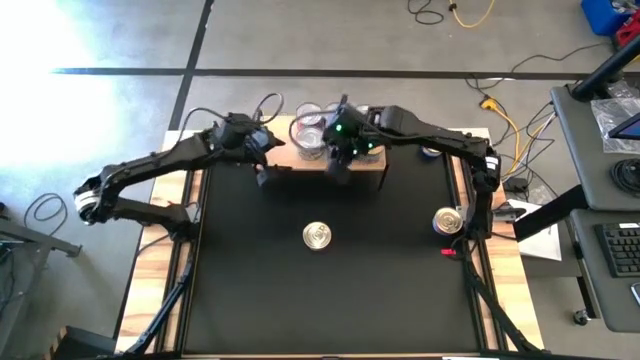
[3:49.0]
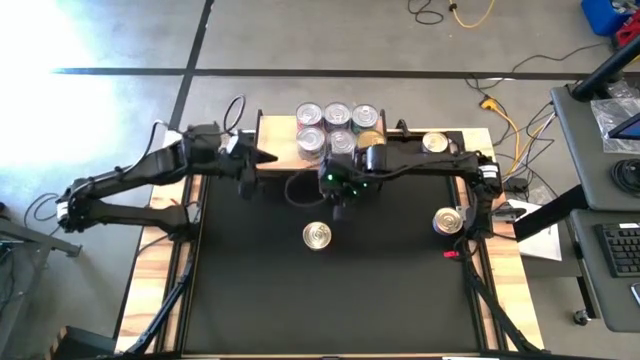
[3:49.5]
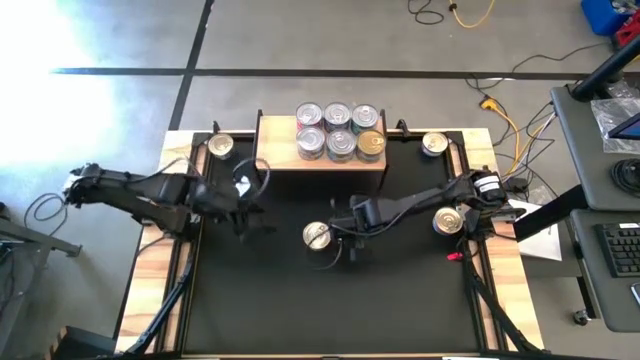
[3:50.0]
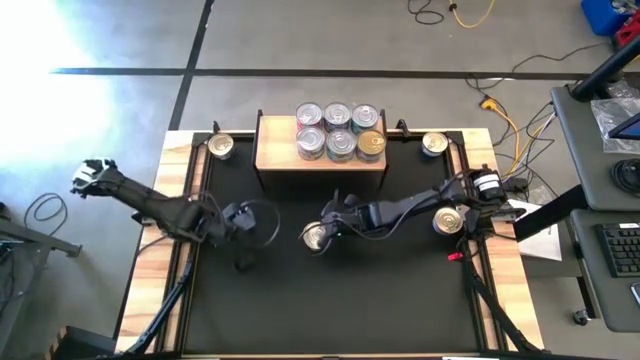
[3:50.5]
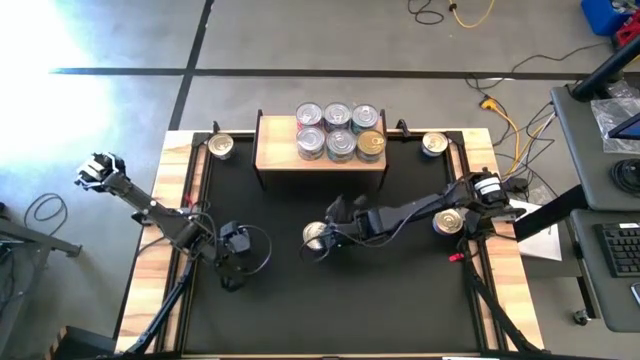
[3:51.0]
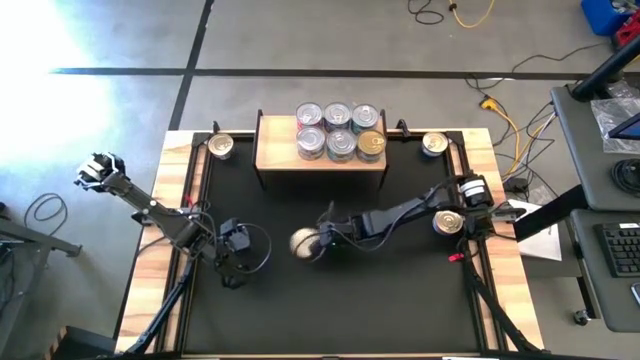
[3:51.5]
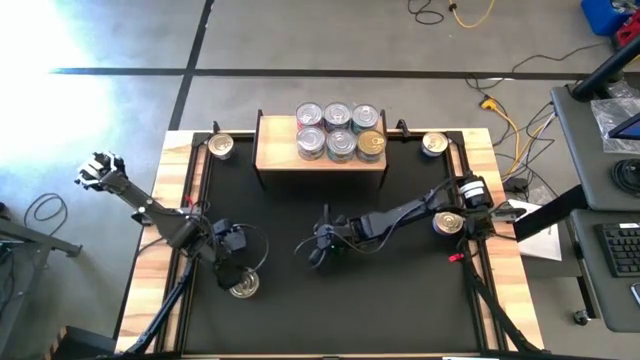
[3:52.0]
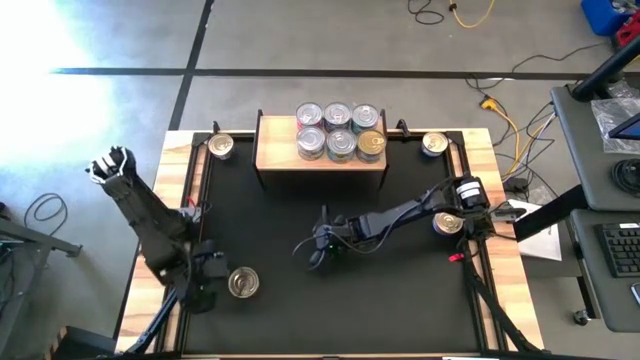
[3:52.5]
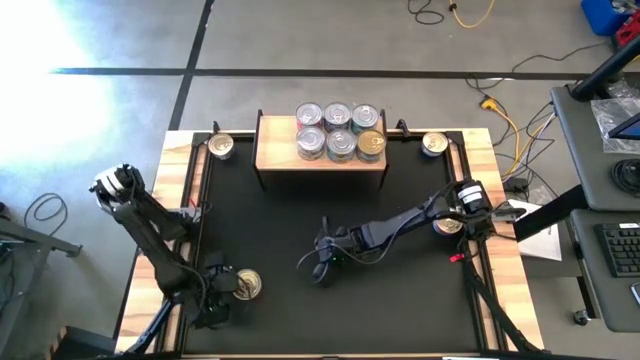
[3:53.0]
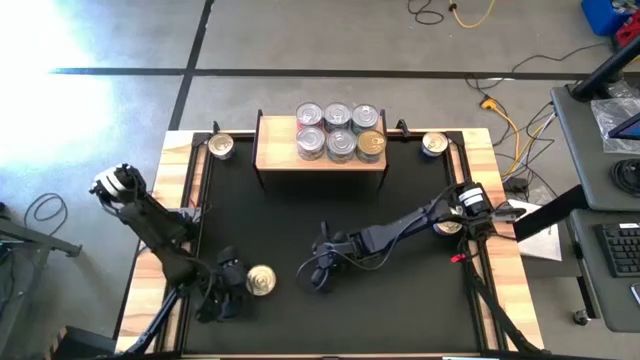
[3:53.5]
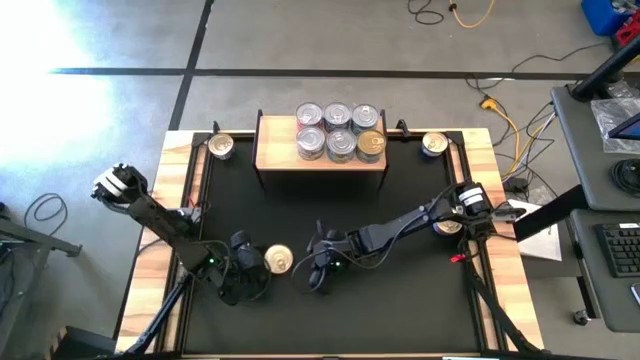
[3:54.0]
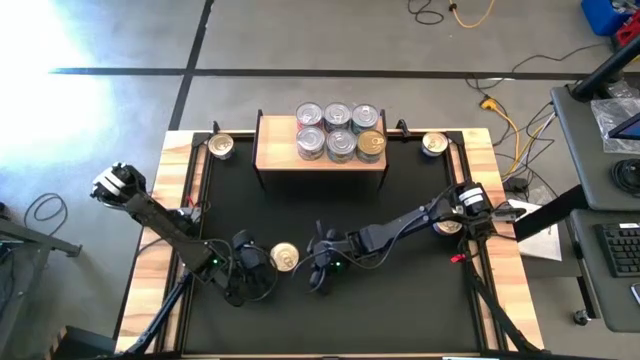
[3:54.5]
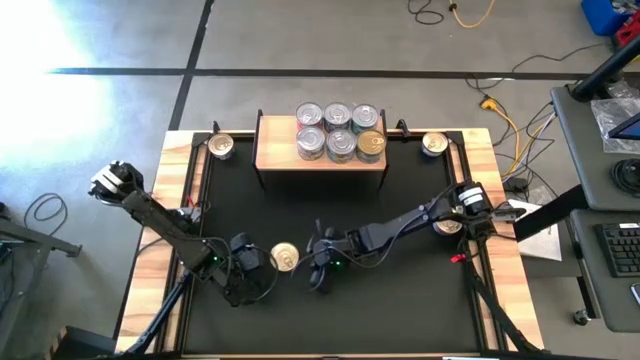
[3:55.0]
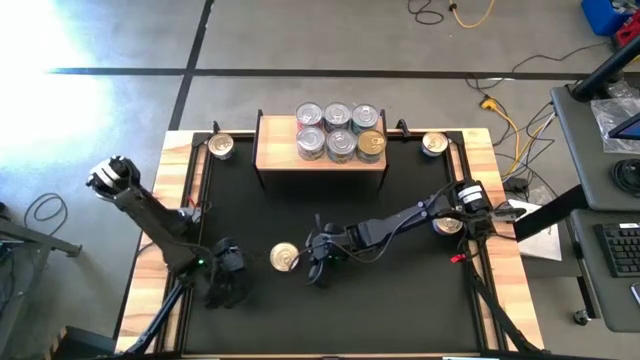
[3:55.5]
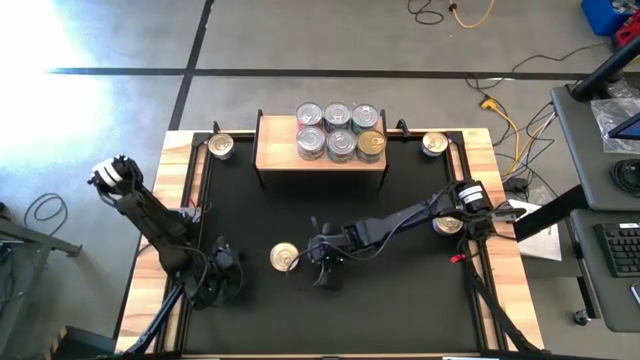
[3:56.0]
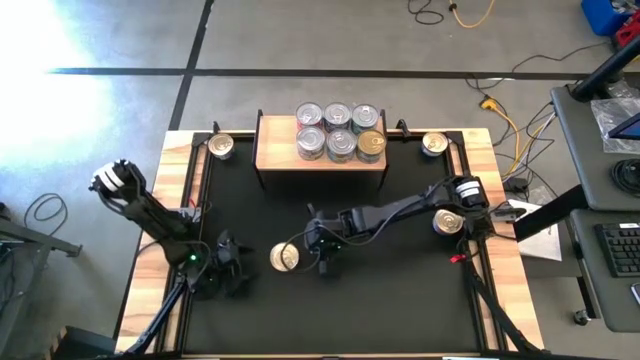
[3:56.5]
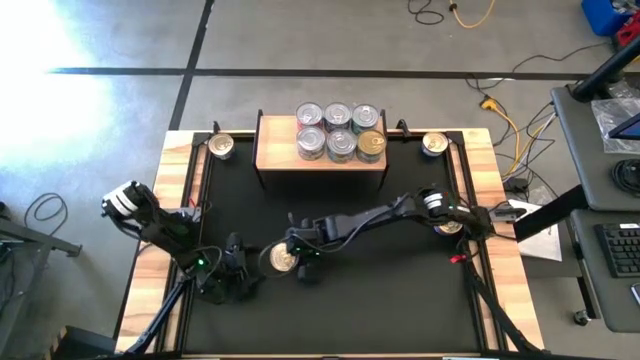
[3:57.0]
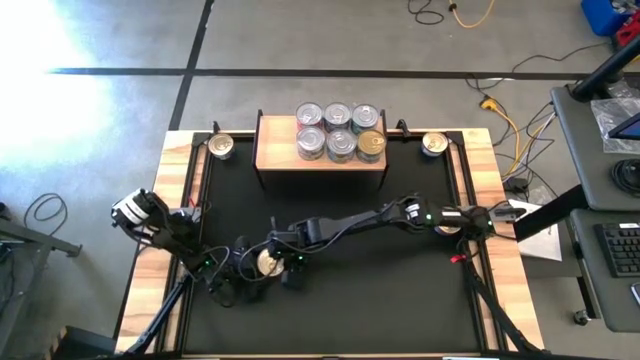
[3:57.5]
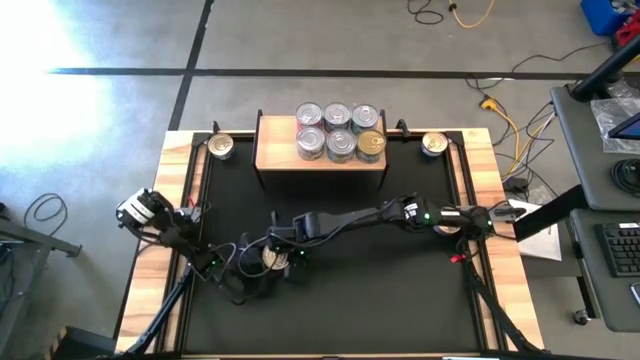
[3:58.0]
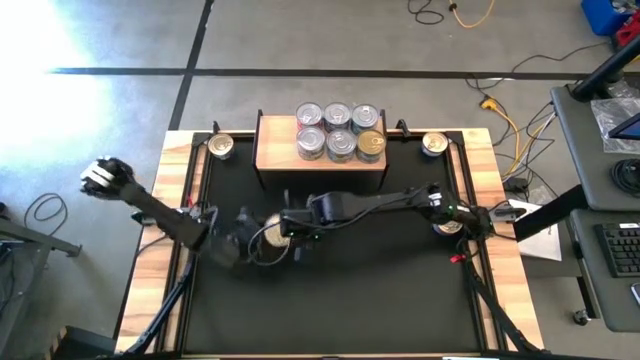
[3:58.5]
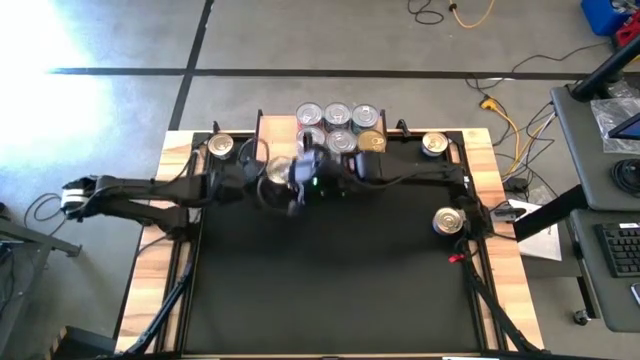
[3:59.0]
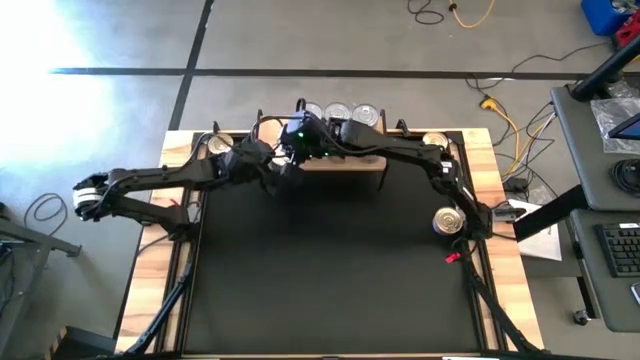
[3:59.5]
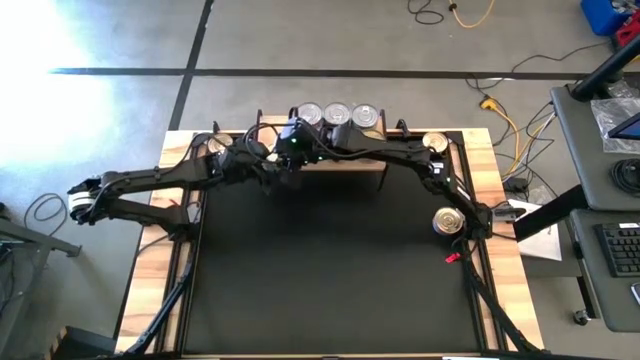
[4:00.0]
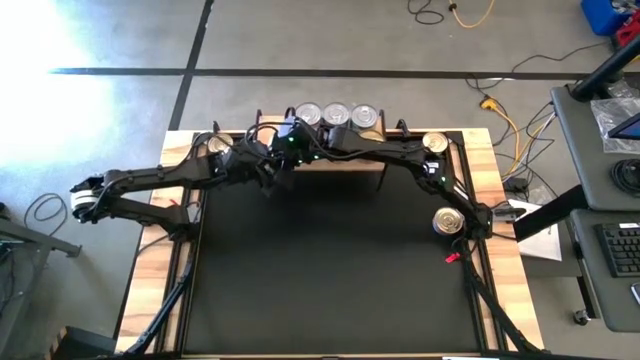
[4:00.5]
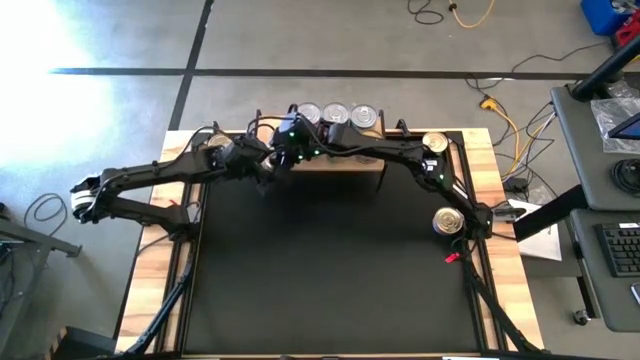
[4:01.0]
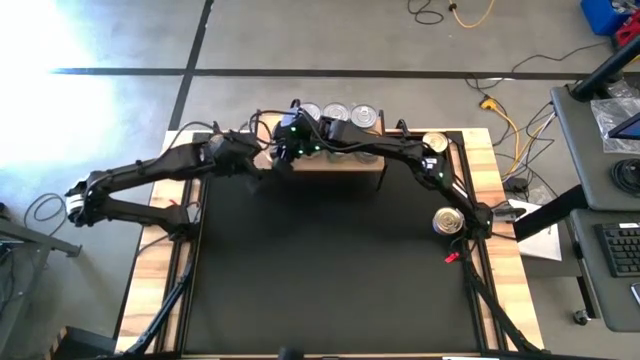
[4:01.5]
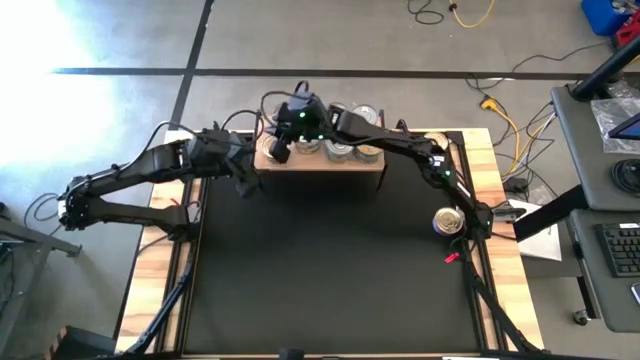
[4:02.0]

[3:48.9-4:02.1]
Task: Stack canned seafood by type on shelf
Put the bottom left blue pink tuna can on the shelf

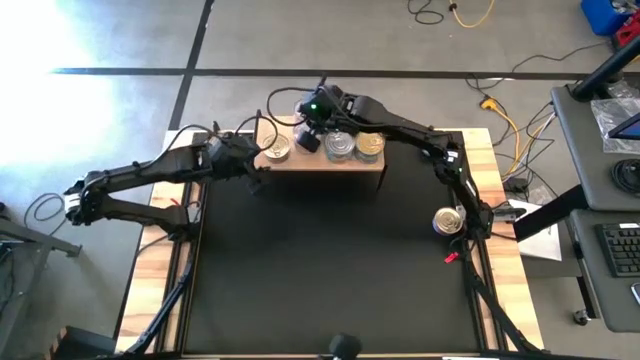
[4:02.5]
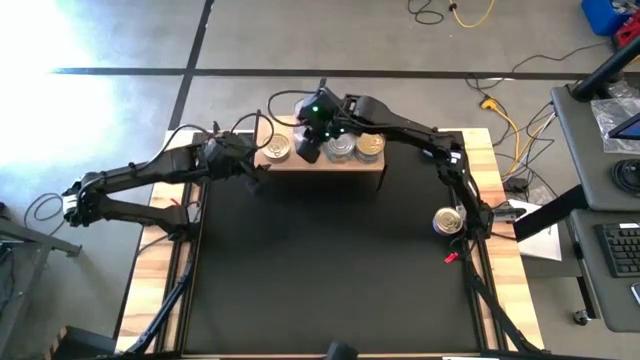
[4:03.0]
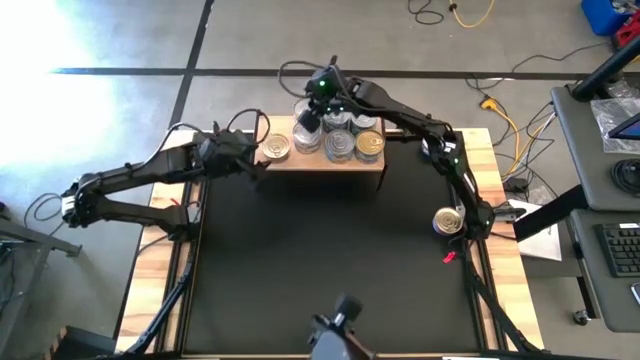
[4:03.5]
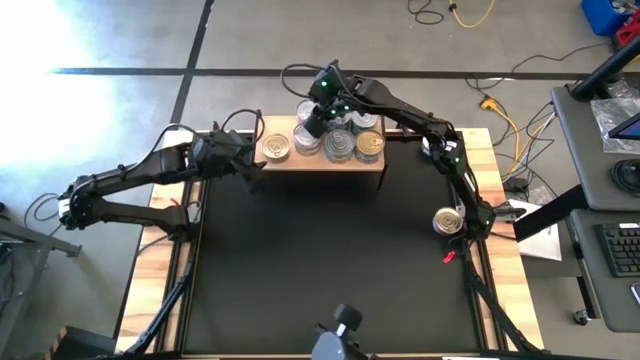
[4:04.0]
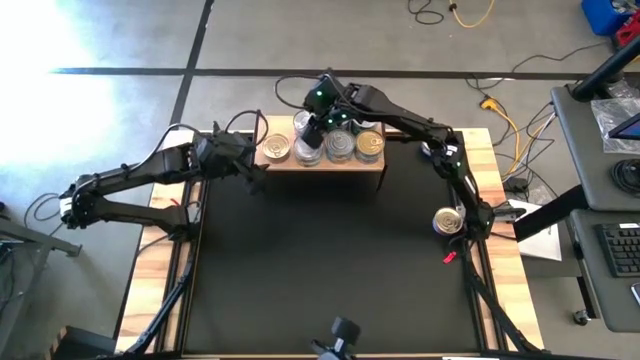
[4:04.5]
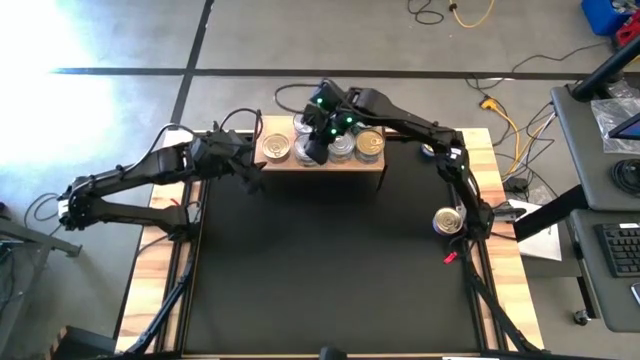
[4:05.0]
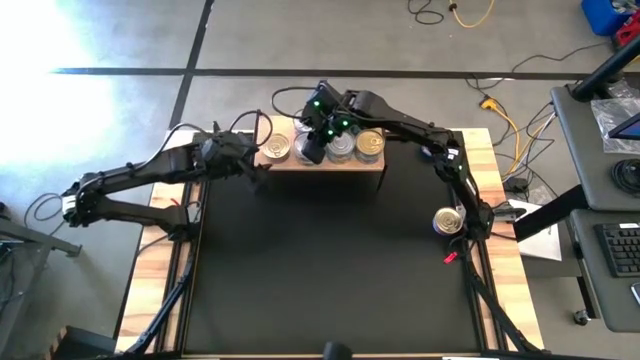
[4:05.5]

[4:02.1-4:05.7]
Adjust the stacked tuna cans on the shelf

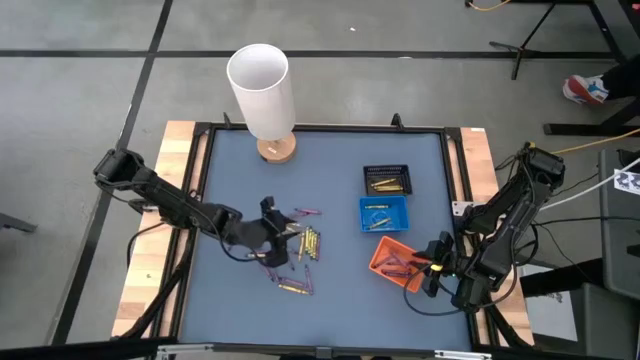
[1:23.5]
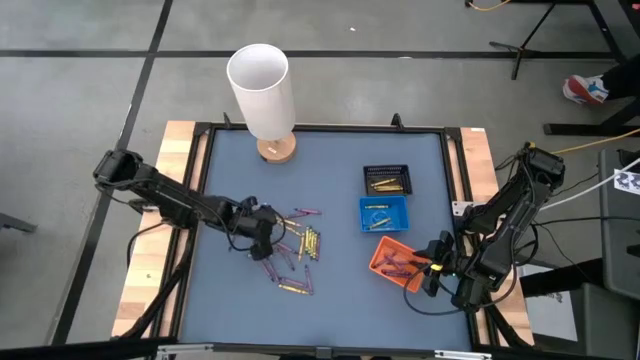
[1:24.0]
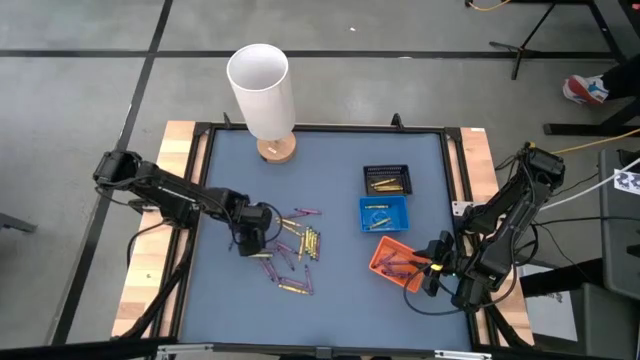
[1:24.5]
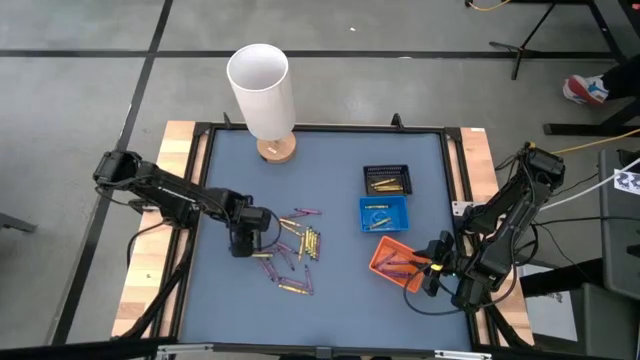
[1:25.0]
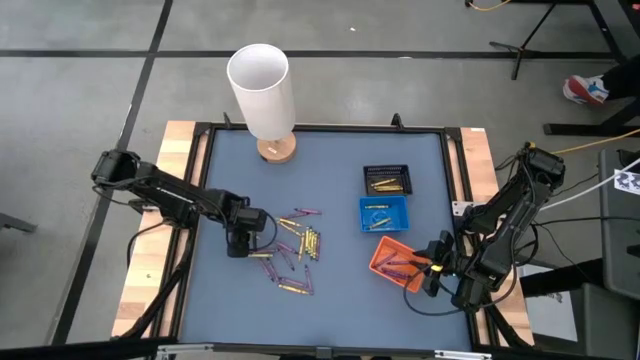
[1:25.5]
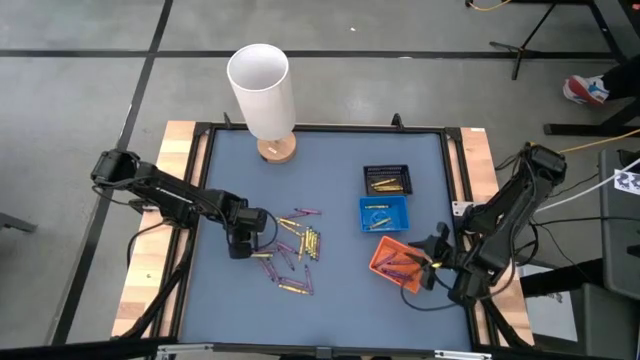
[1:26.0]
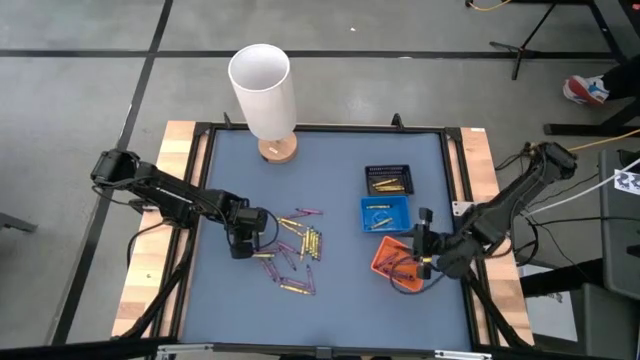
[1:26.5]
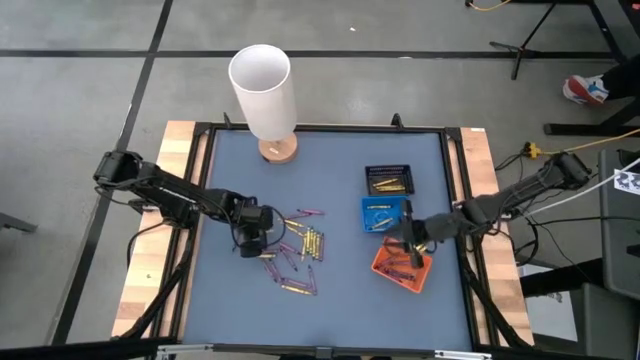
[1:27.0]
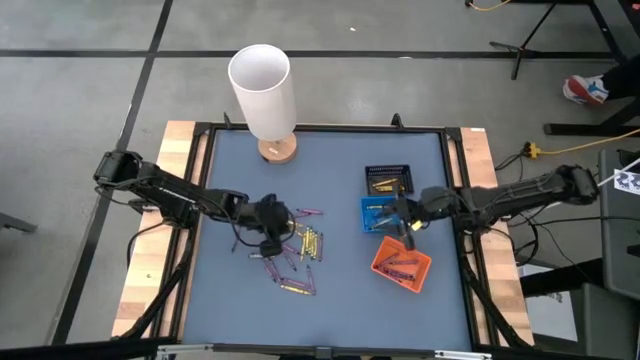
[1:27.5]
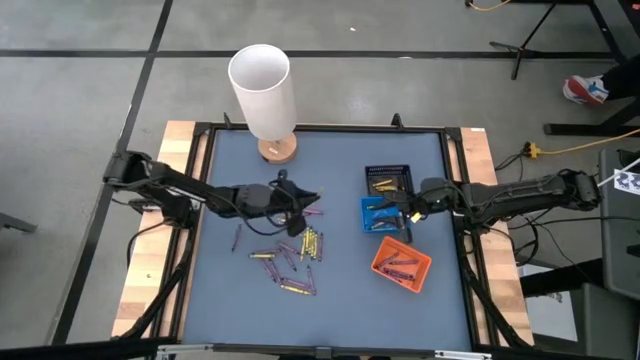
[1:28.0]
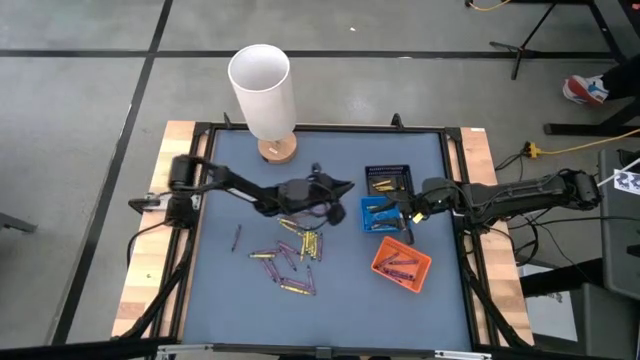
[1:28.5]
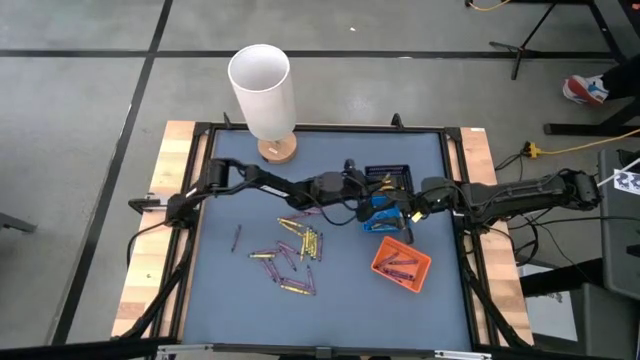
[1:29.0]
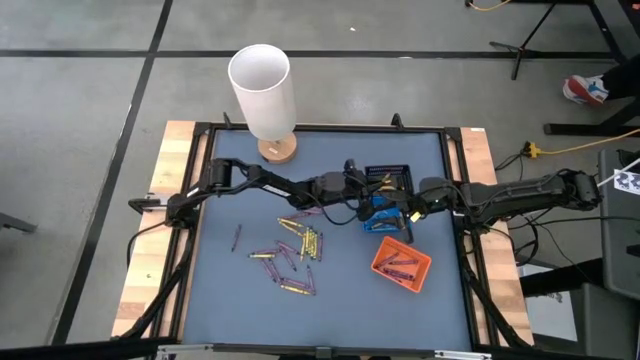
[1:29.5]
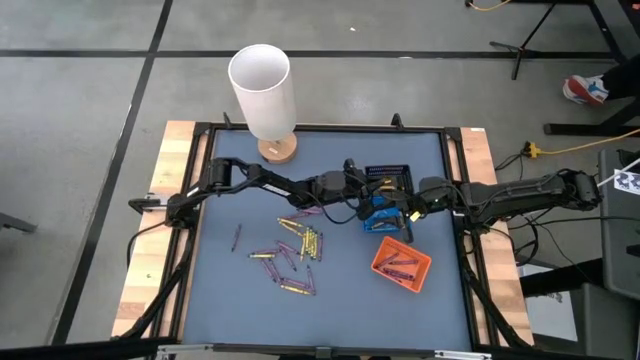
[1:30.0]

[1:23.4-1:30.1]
Task: Sort crayons
Put the yellow crayon into the black bin
